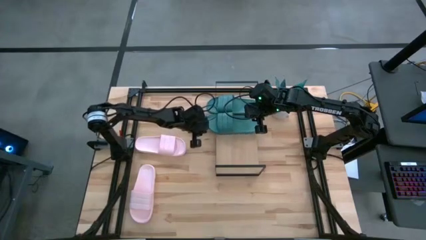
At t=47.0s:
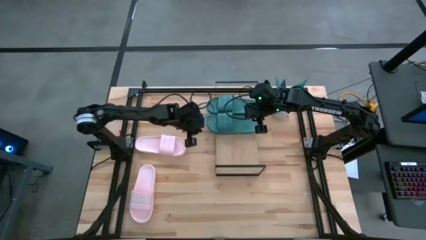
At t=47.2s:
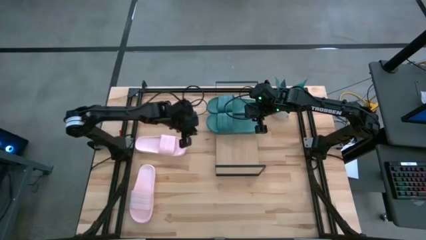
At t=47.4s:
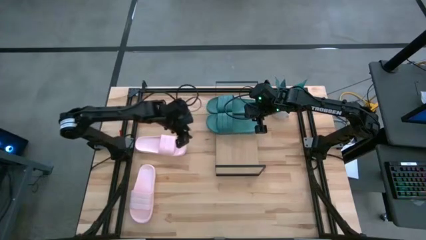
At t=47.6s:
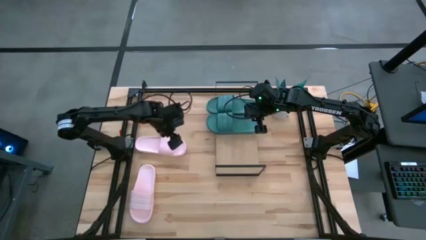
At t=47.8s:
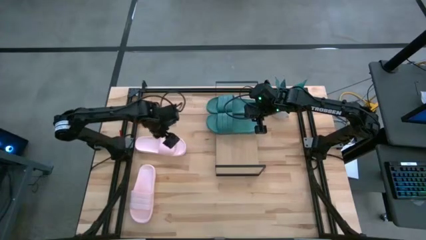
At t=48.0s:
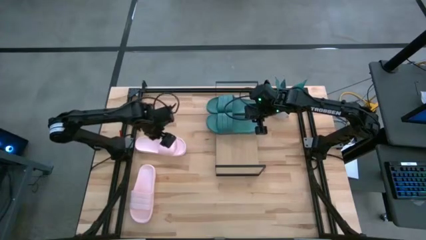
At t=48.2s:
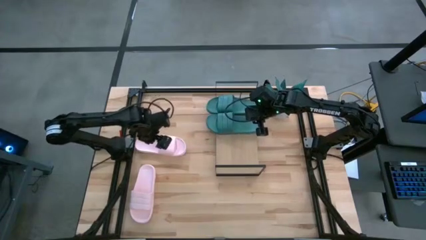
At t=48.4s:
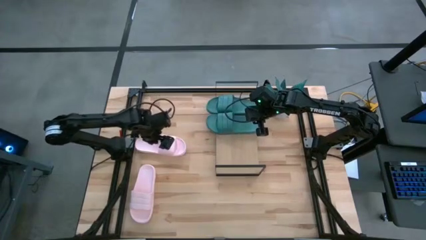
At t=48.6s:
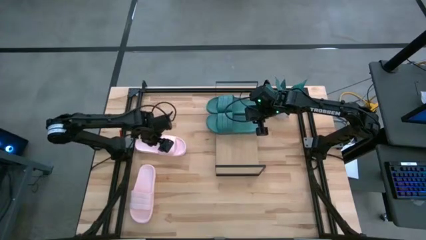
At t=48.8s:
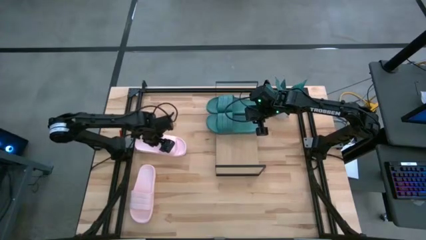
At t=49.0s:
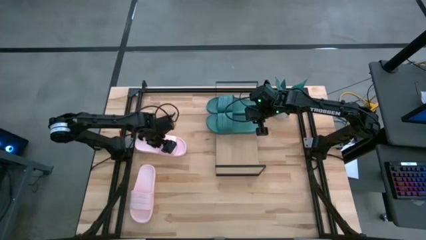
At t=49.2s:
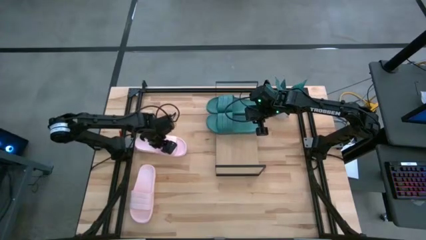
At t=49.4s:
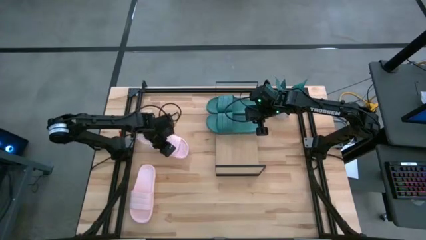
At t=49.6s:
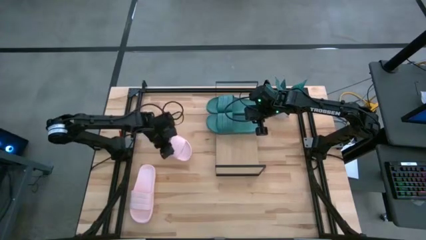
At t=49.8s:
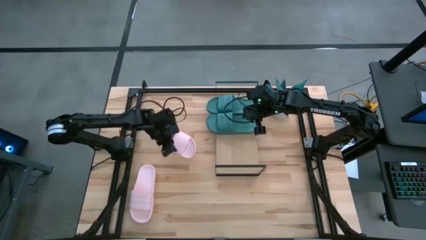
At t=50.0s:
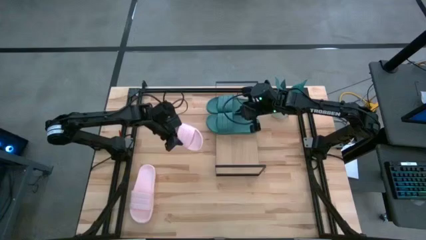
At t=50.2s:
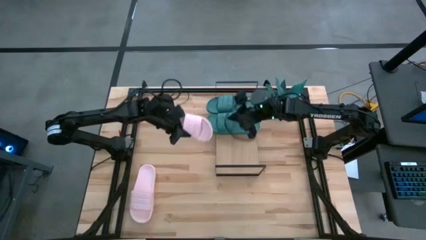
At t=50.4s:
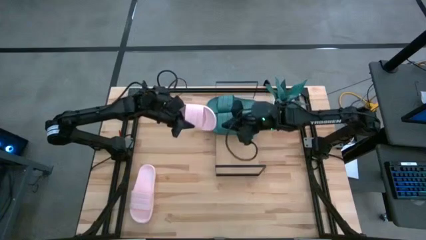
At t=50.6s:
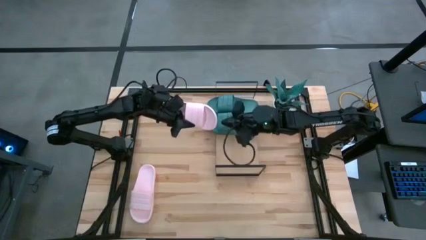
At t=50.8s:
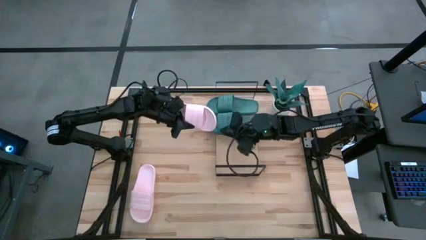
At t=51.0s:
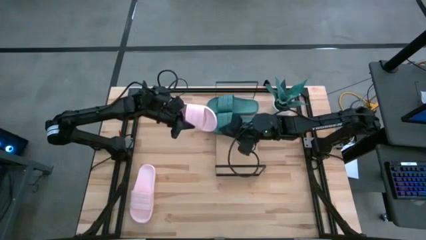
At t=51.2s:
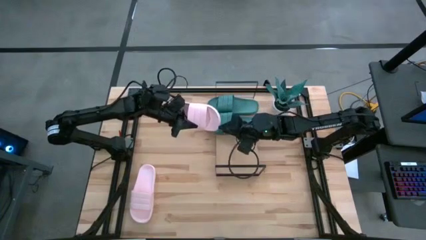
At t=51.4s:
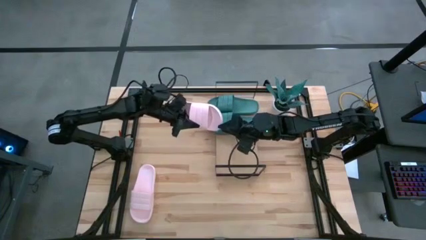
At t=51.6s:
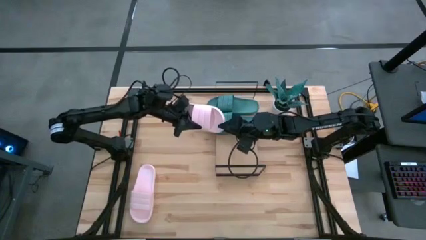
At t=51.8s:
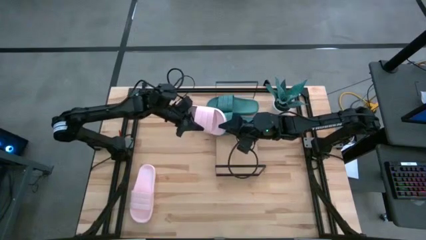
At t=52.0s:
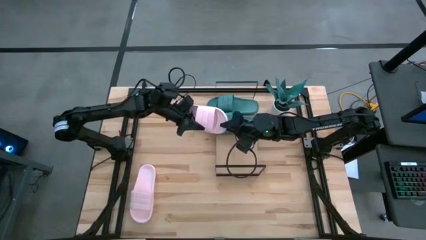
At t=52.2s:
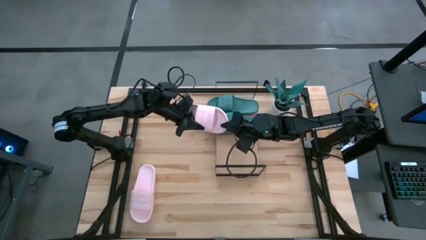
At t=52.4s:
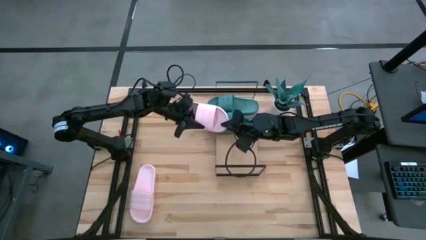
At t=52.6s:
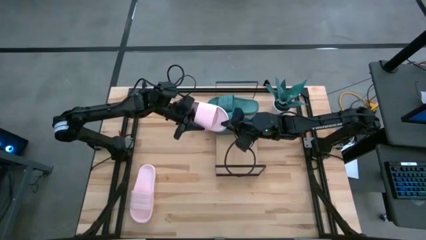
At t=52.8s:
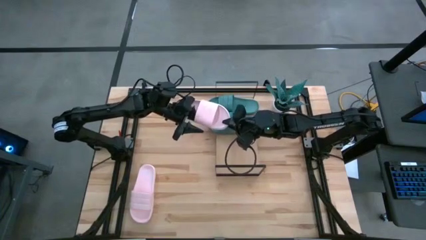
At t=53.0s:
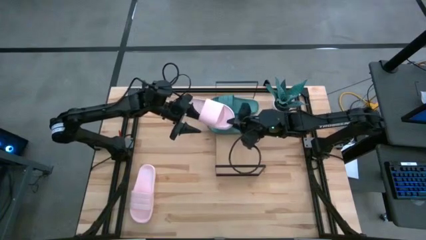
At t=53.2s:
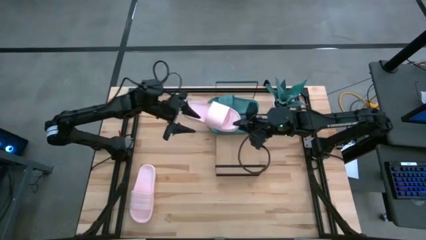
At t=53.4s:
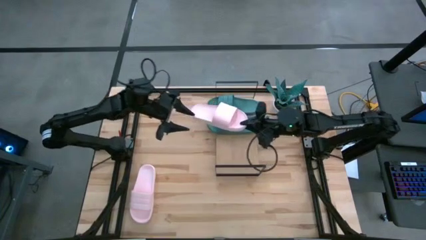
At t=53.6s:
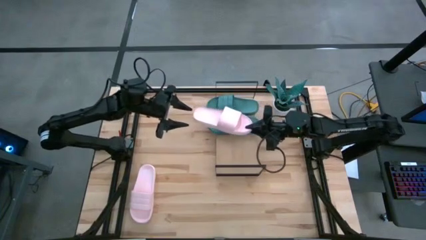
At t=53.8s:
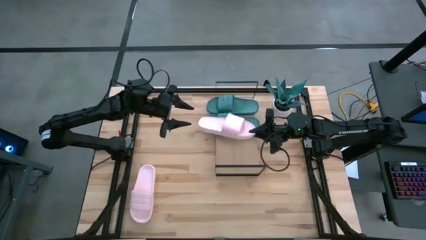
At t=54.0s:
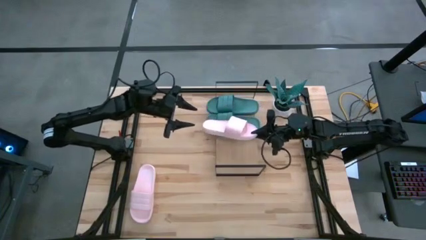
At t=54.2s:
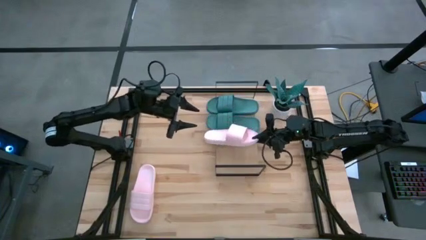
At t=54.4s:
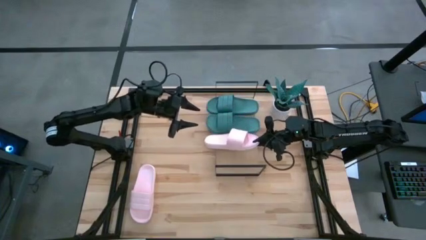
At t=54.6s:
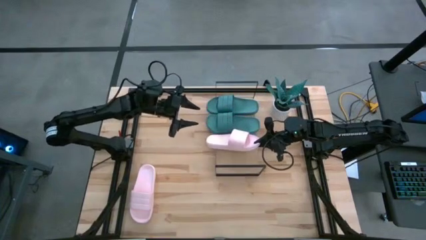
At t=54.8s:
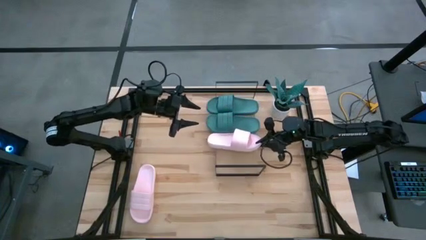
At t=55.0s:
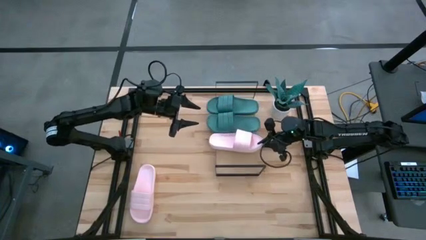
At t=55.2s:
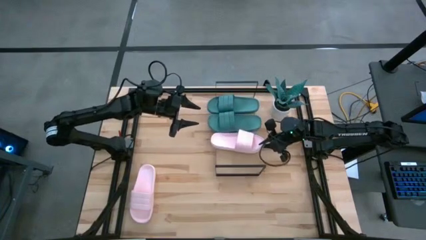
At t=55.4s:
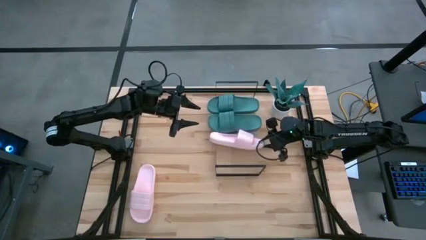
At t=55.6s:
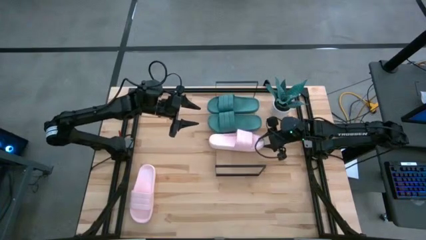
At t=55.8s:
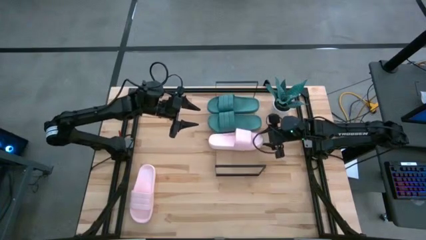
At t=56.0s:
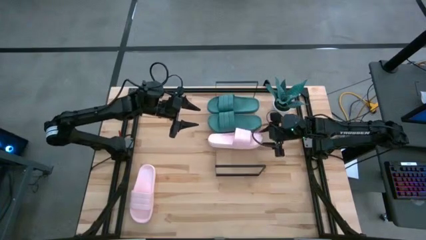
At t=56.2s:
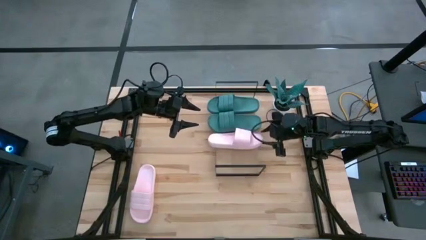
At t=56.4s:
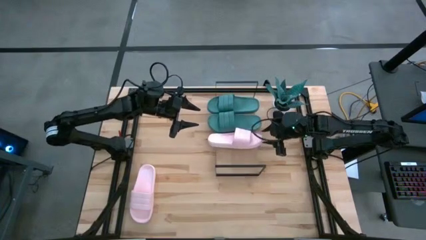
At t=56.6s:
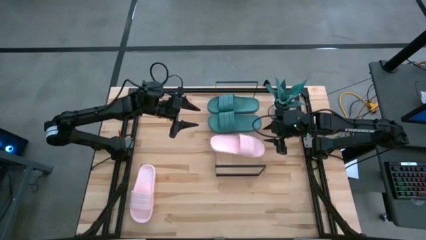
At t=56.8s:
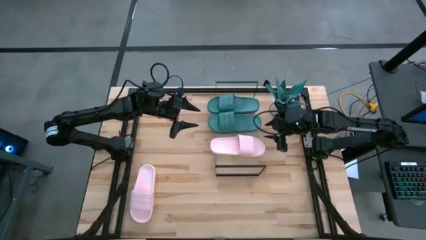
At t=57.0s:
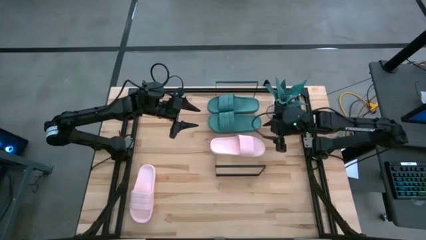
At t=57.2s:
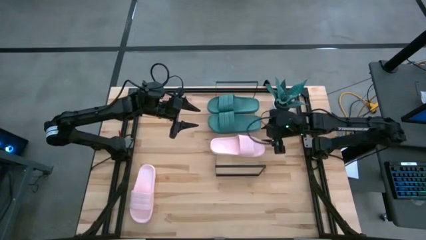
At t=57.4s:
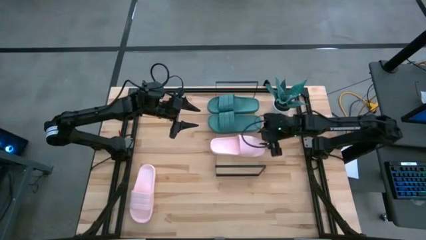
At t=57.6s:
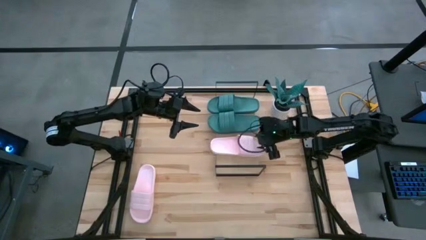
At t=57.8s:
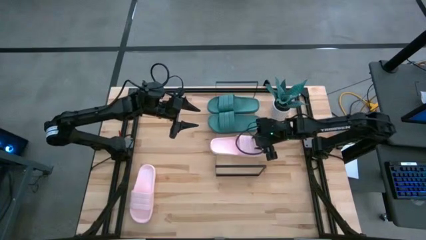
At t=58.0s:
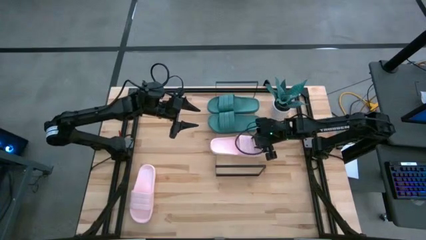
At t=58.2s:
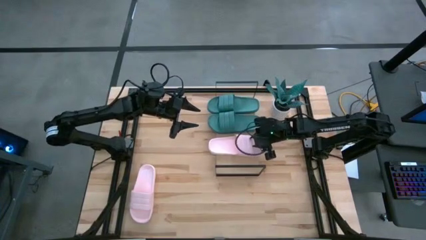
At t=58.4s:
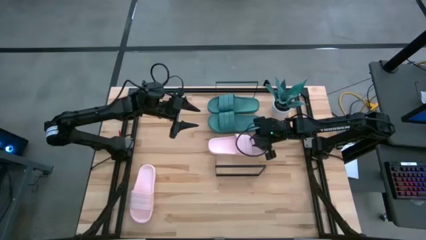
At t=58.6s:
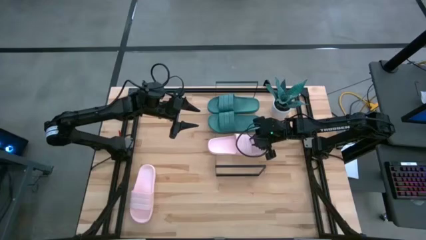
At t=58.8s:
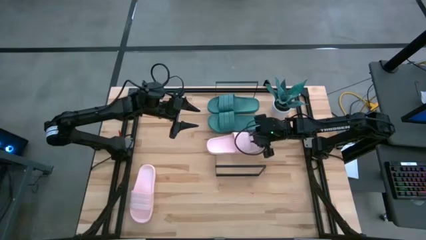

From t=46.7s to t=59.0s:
Task: Pick and place slides into the shelf
Put the top pink slide on the shelf

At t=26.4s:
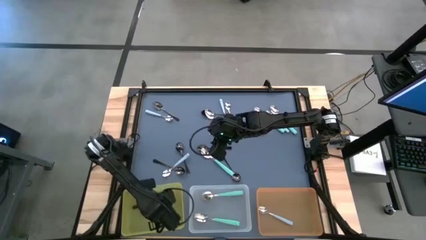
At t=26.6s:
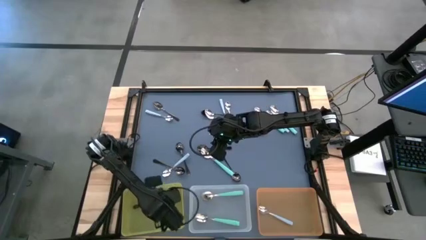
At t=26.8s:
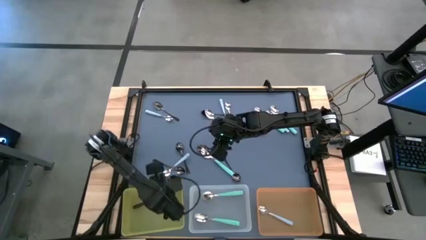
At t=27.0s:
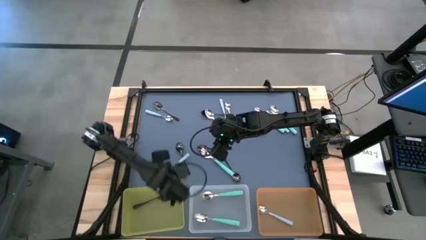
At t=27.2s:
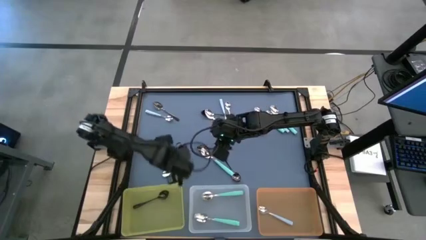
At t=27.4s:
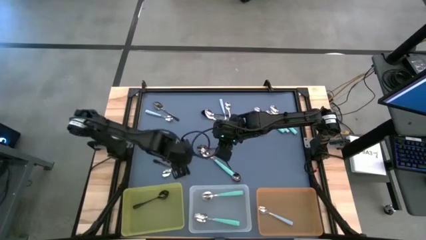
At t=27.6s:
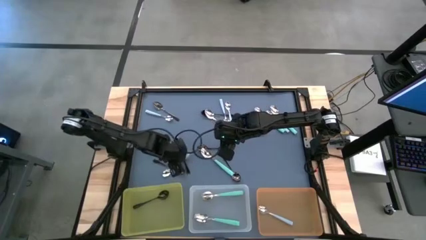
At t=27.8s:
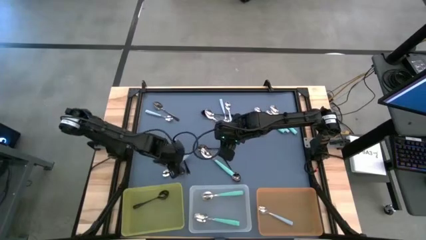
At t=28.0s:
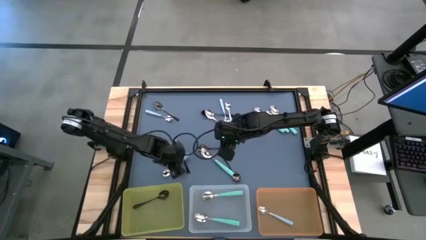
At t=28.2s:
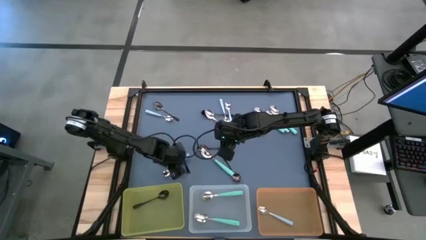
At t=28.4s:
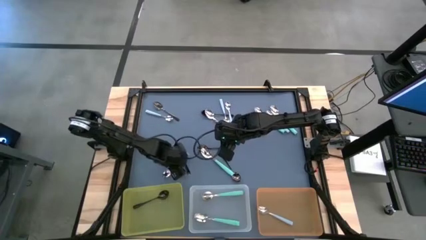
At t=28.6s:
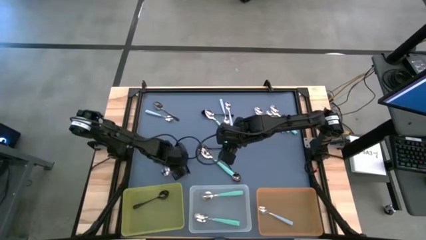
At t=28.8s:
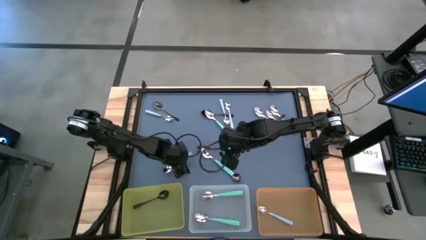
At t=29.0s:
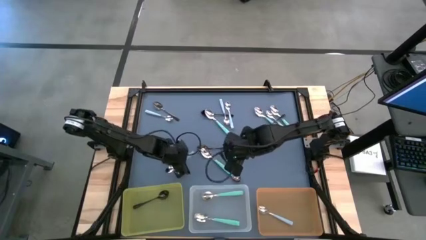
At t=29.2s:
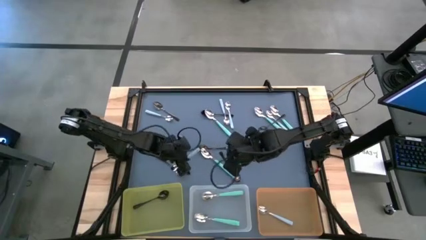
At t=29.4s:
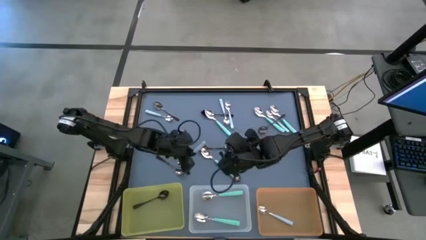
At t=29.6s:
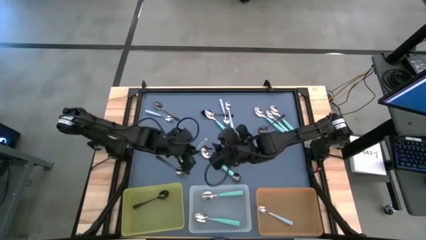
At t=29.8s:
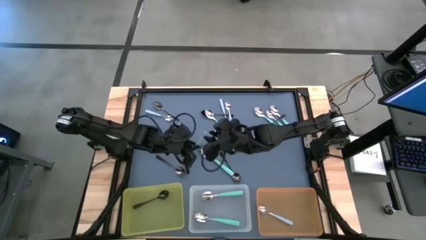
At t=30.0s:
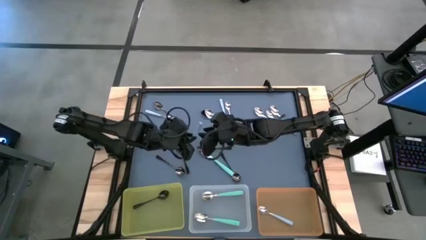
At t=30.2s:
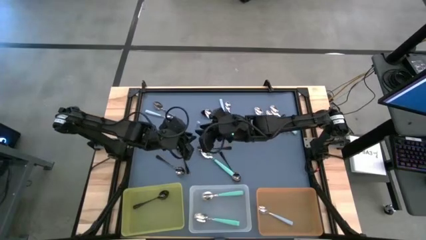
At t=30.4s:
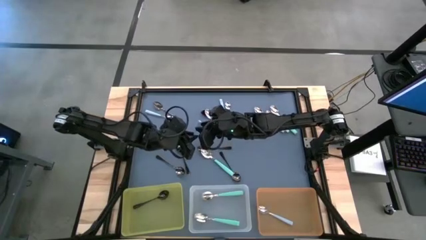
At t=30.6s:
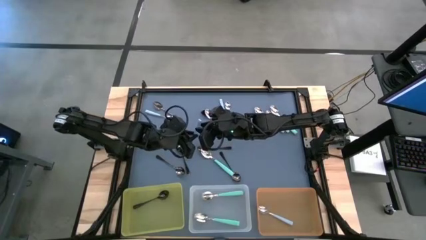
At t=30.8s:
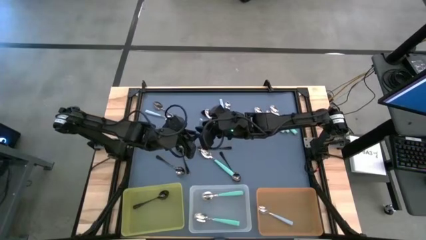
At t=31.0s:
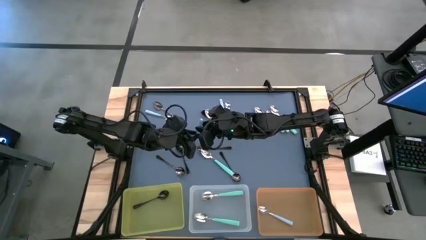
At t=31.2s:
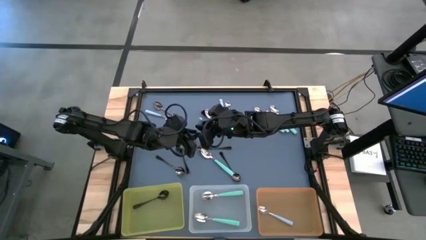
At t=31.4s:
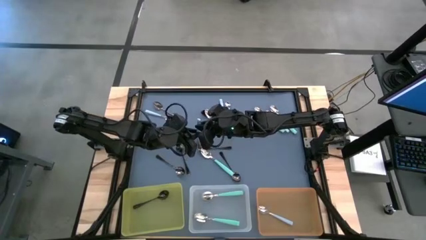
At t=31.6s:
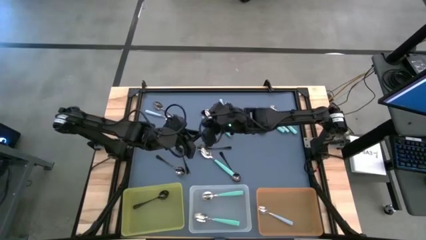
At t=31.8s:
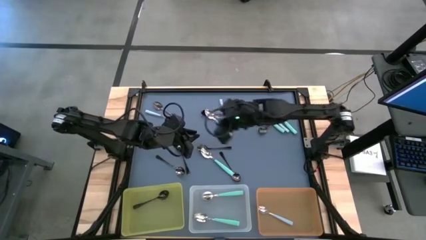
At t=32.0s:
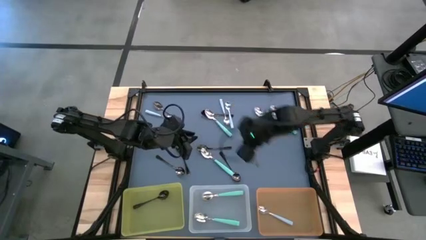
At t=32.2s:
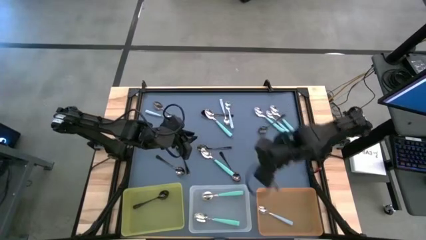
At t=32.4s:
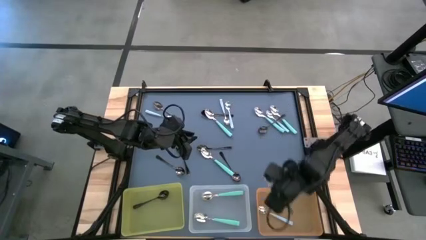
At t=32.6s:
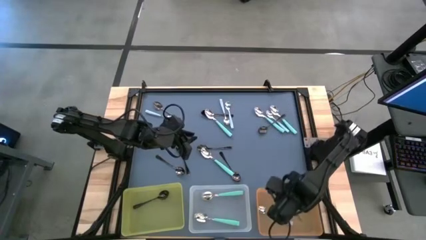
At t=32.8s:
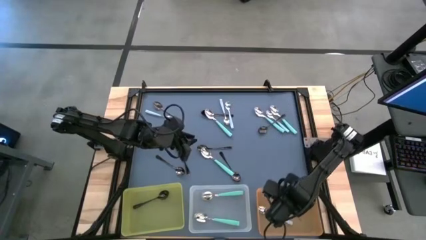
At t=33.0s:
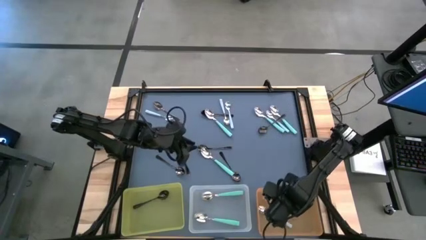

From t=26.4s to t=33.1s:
Task: Sort silverware by color (type)
Put the blue spoon into the orange bin
